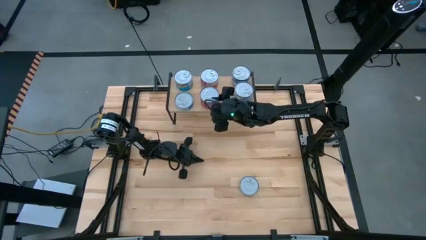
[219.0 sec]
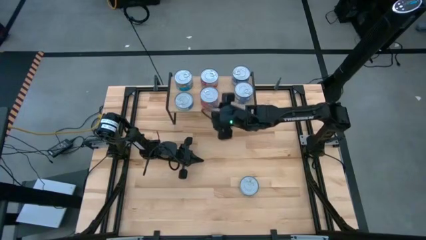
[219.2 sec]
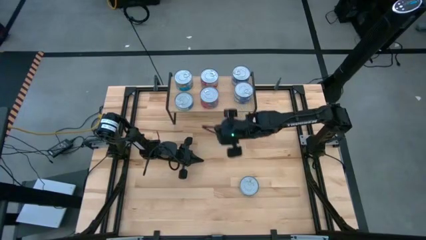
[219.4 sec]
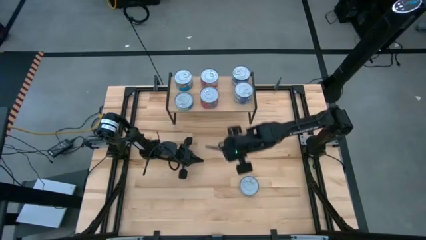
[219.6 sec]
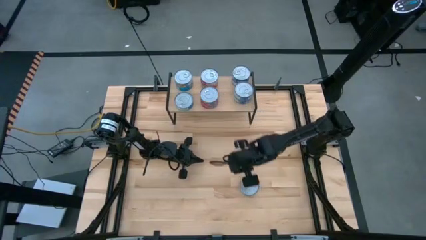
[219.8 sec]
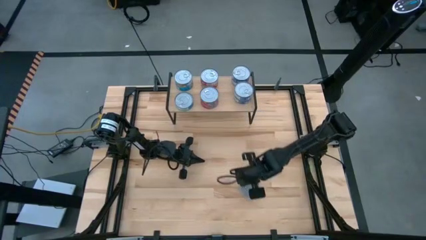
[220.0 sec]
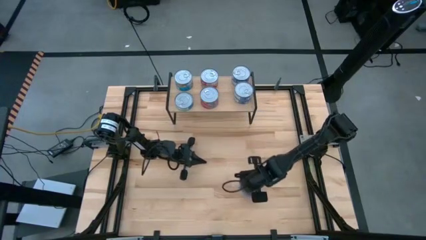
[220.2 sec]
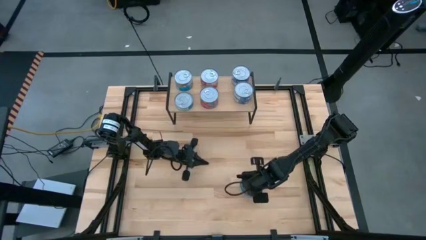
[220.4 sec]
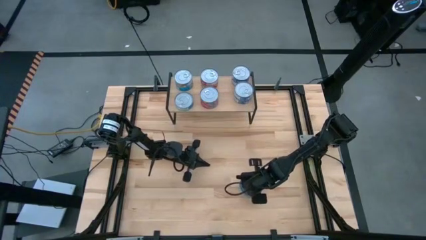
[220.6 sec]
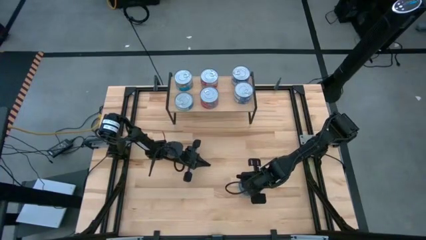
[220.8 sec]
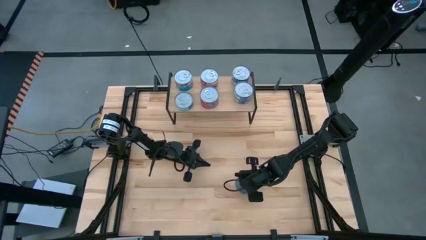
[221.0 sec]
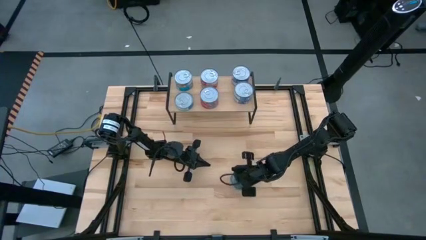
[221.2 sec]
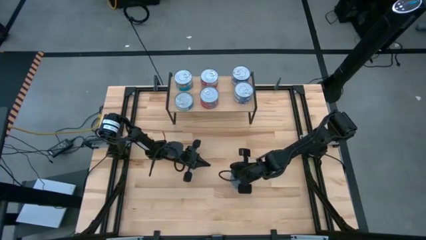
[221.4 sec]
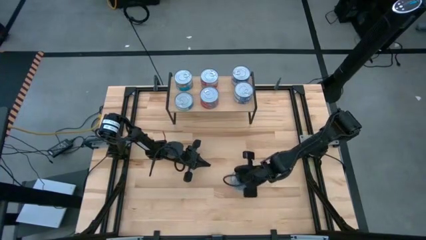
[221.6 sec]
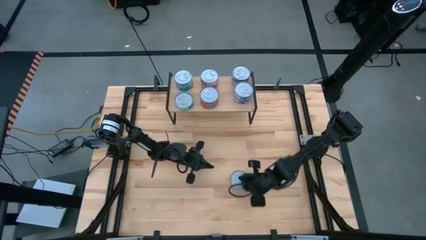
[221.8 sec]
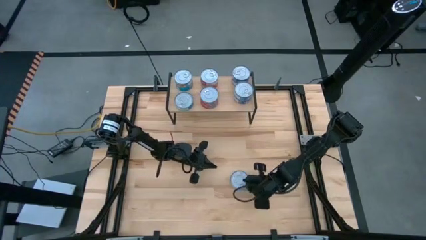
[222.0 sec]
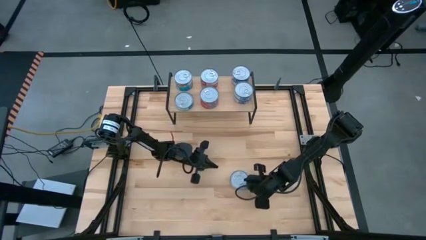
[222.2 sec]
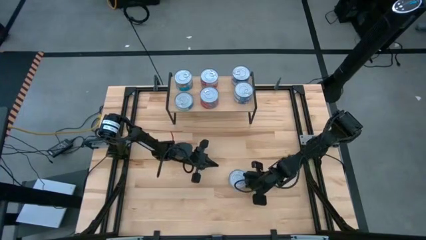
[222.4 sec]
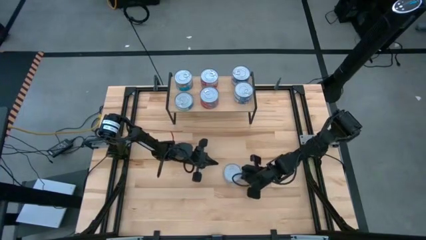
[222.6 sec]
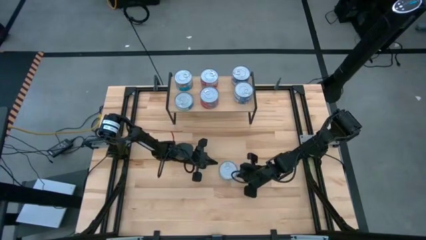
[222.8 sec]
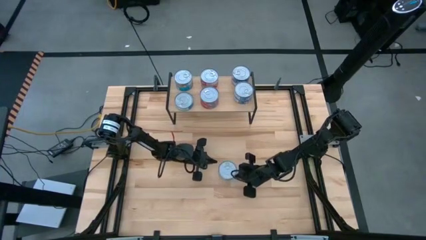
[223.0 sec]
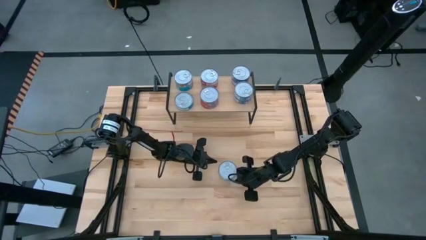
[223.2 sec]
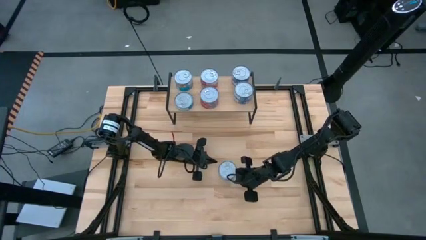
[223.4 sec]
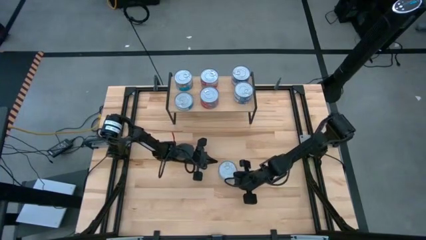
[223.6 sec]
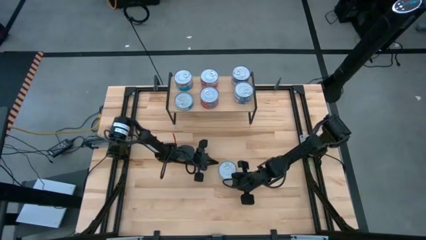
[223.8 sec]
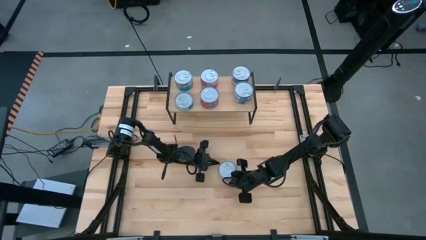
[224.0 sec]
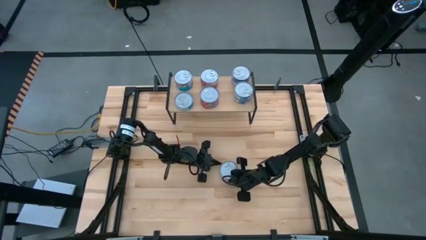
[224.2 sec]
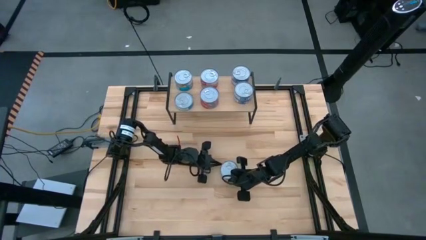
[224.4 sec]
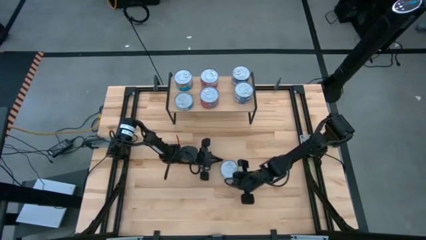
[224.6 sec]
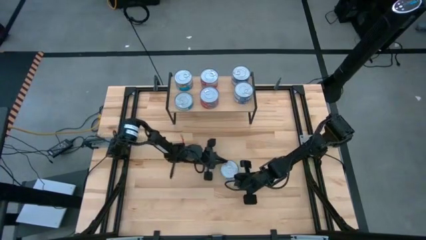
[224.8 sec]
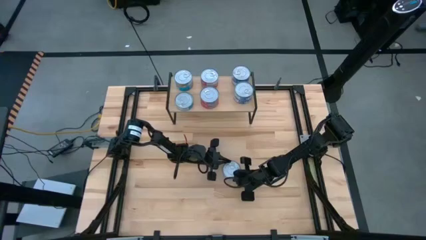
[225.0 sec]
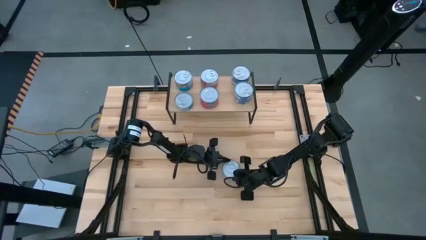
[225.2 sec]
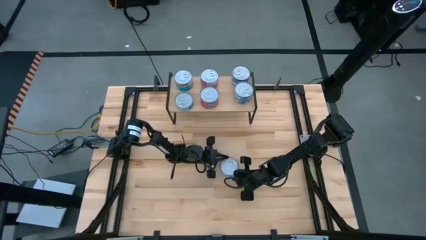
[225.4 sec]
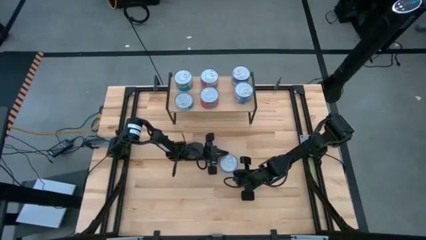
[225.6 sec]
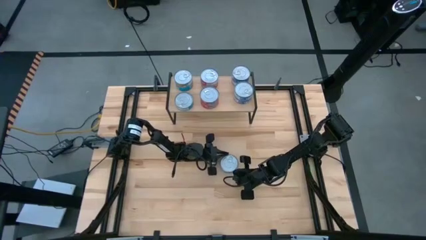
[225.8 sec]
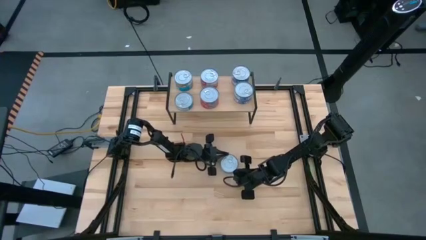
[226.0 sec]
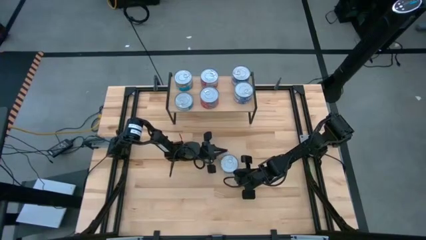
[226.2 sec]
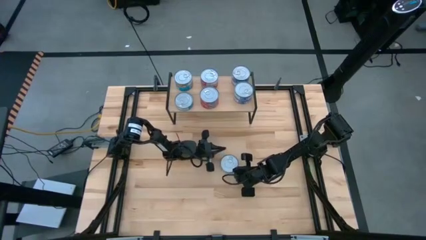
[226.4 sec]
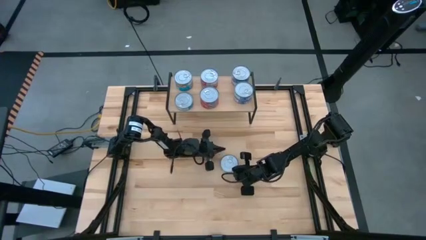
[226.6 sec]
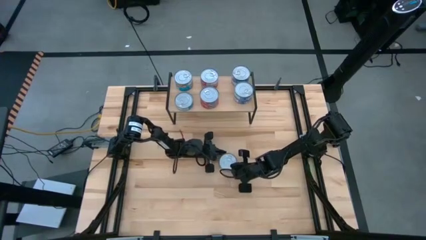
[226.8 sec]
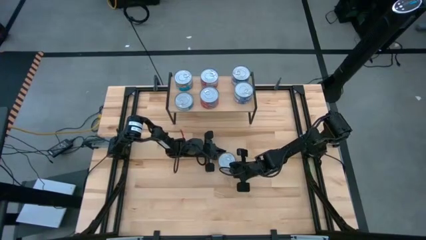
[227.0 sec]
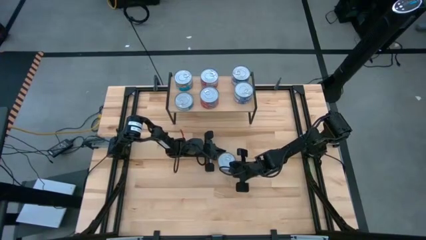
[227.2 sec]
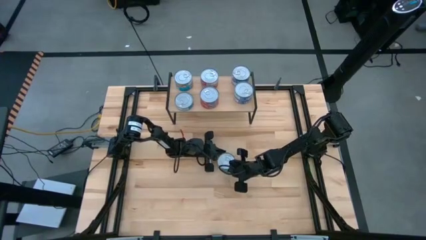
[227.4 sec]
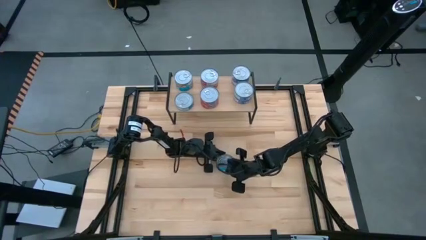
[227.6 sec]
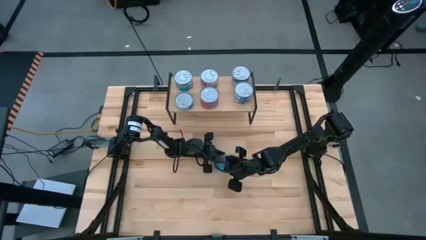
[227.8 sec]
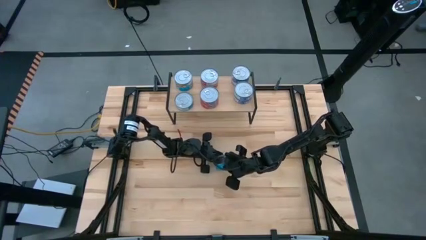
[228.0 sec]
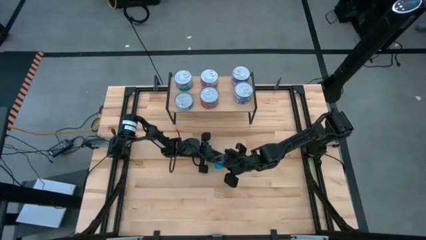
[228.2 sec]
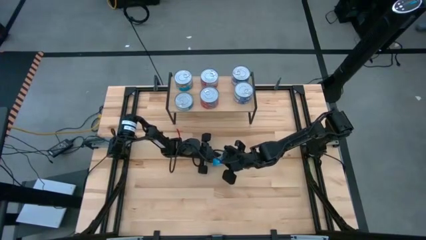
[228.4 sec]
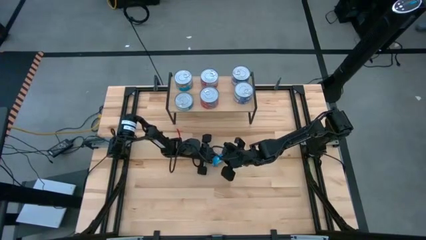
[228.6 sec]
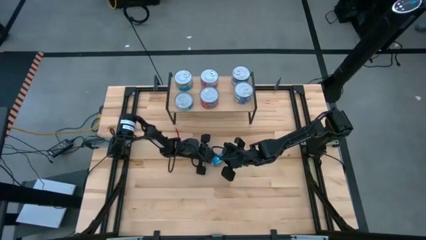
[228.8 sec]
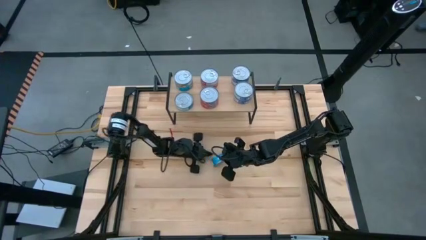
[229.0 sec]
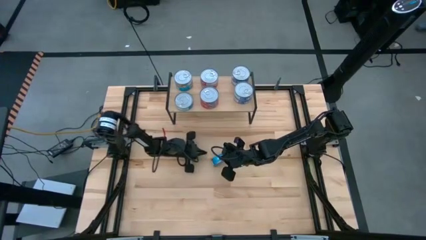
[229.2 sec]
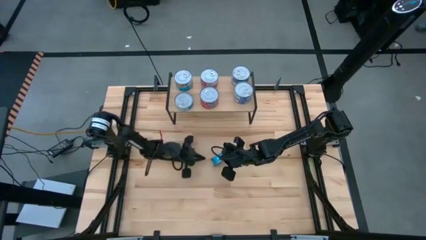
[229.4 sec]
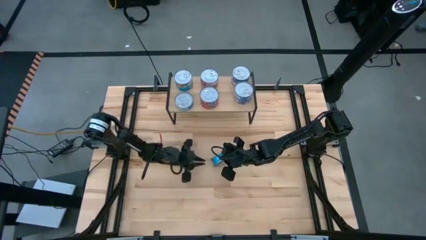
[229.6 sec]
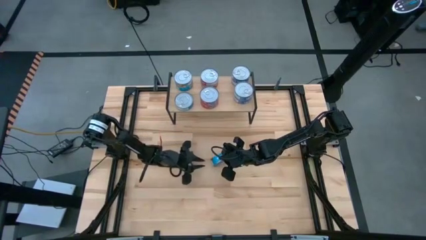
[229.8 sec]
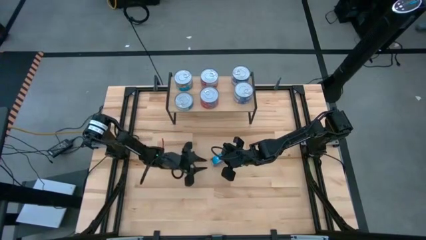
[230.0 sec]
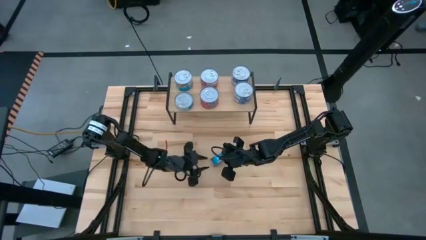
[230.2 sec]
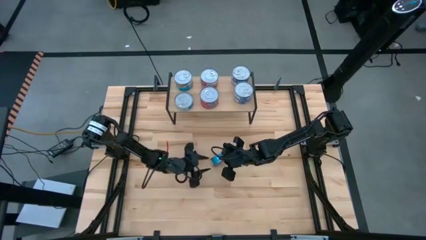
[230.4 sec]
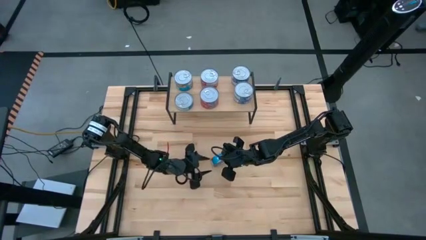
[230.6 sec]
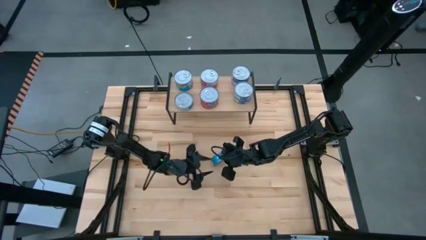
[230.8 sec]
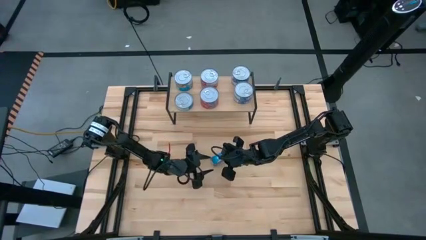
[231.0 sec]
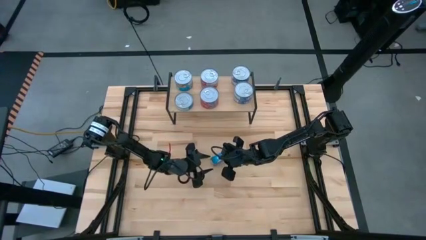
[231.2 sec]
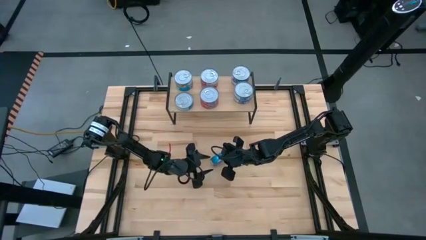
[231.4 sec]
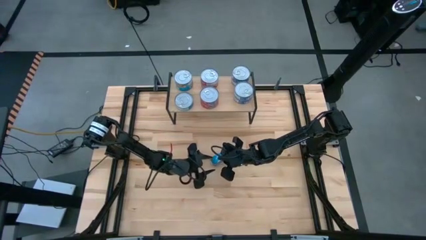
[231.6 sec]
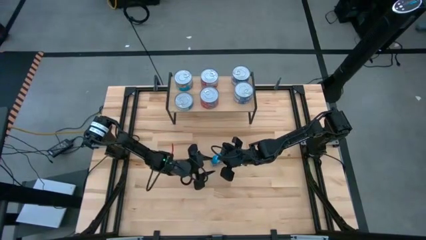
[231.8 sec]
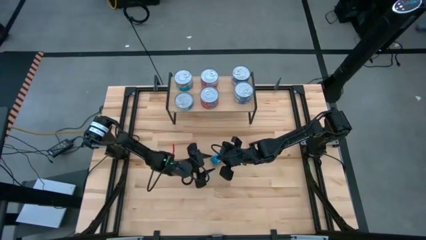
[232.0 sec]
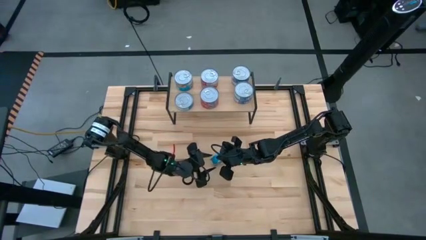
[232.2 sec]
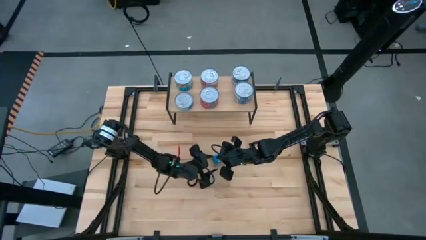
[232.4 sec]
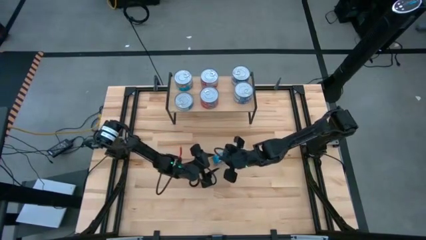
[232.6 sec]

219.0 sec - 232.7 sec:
Task: Stack canned seafood by type on shelf
Stack the yellow blue tuna can on top of the other yellow blue tuna can on the shelf

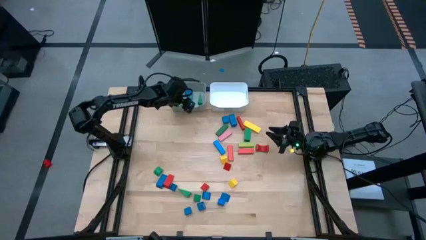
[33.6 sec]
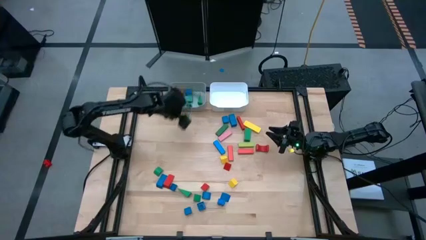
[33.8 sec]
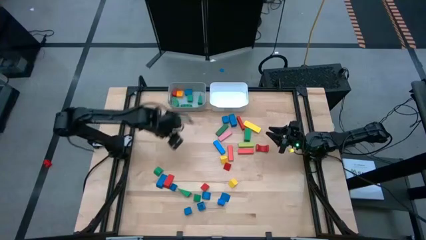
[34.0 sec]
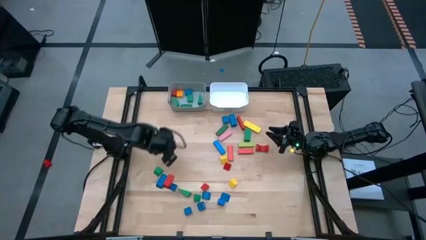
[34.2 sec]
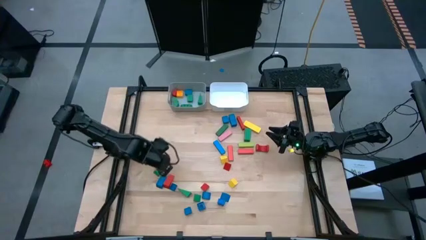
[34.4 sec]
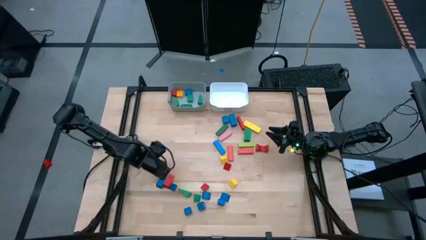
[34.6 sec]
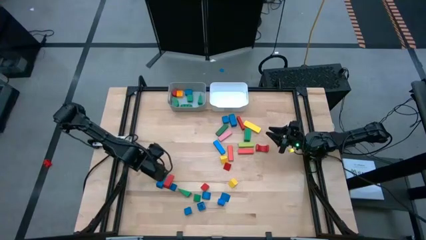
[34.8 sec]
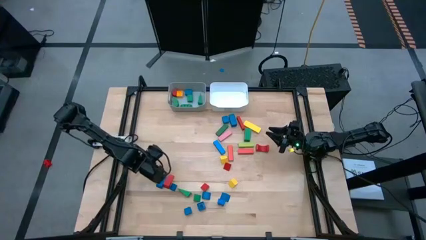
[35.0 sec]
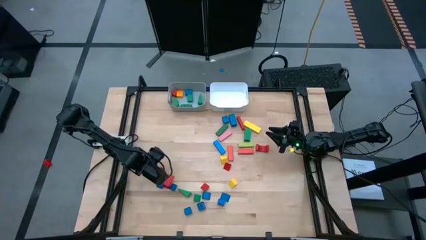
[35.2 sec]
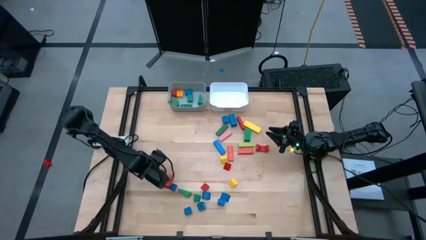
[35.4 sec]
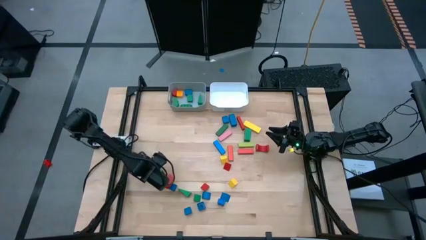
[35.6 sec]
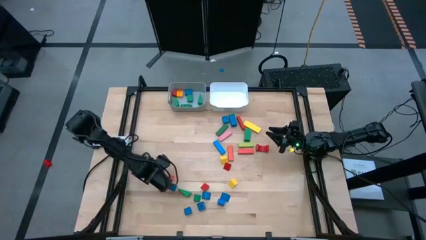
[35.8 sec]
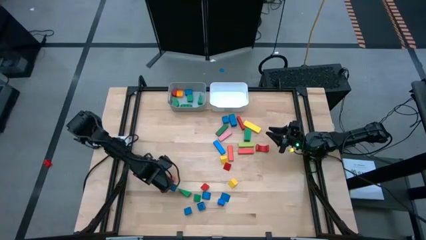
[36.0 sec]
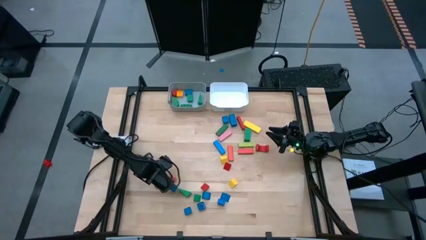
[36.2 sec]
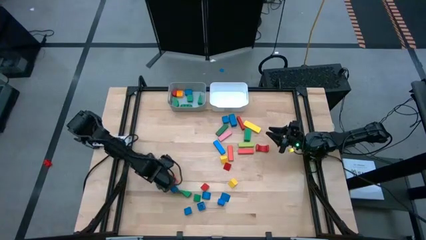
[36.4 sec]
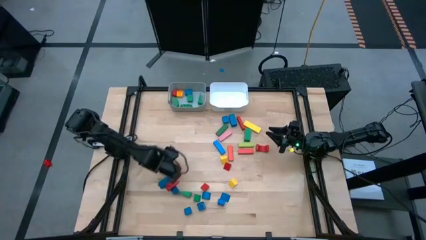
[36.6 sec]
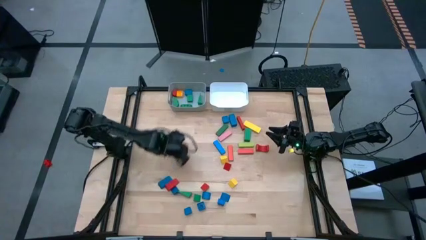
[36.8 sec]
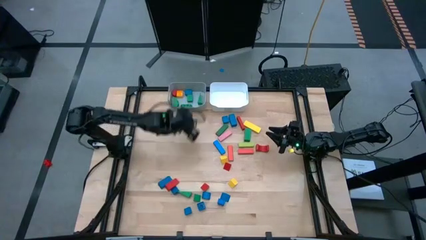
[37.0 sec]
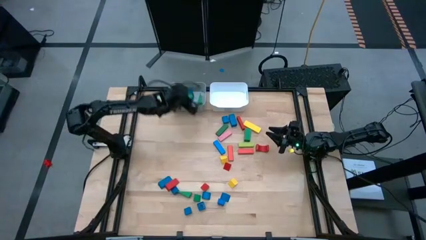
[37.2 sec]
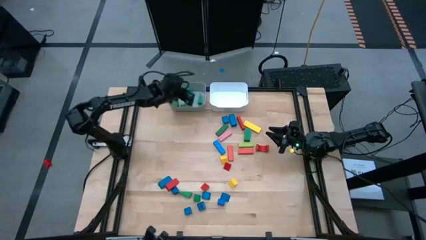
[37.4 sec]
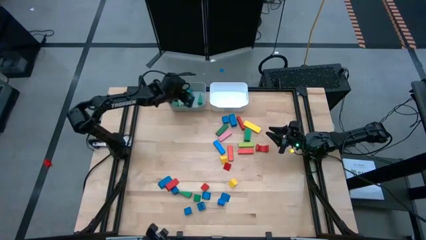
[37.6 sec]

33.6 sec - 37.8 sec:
Task: Sort blocks by size
Put the green semi-circle block into the gray bin
